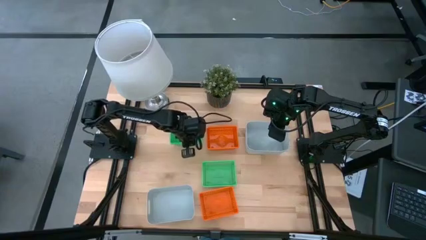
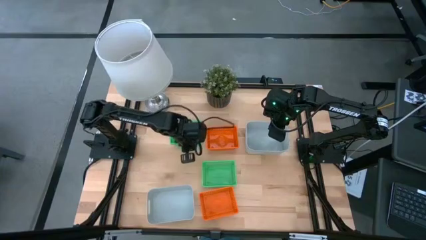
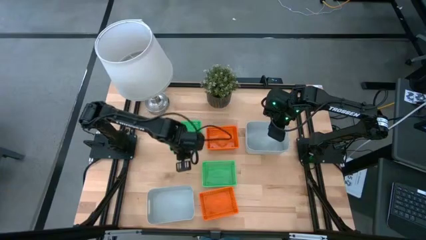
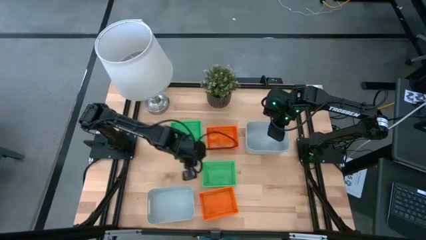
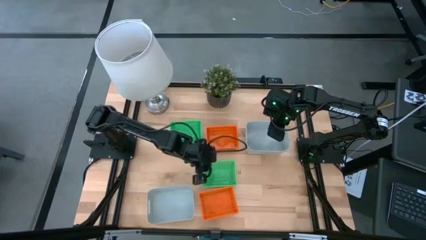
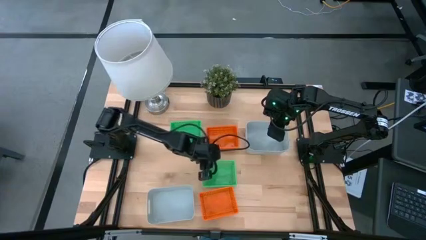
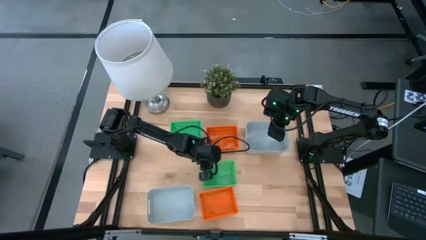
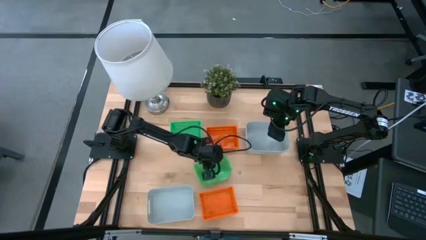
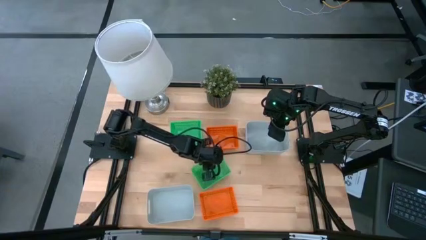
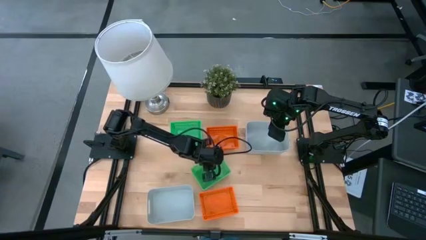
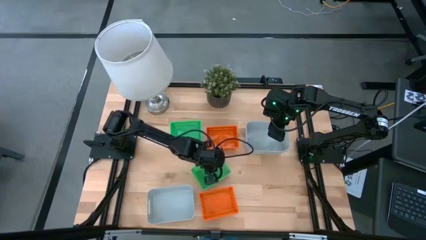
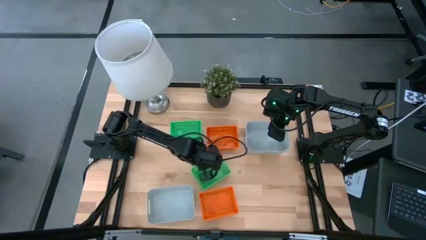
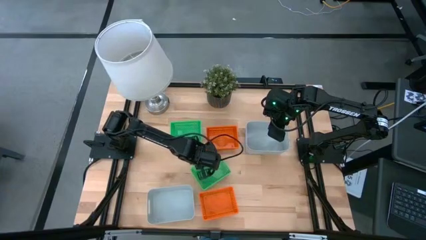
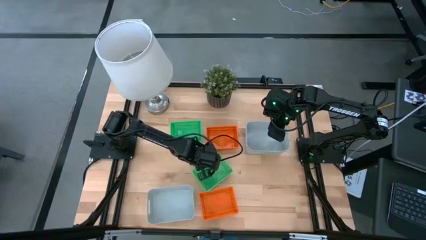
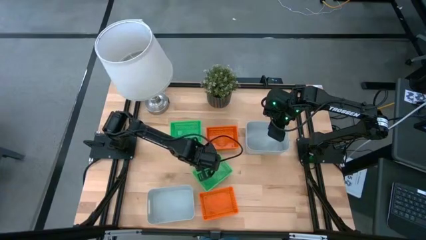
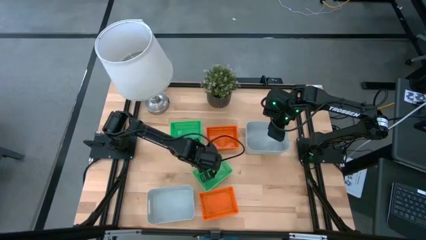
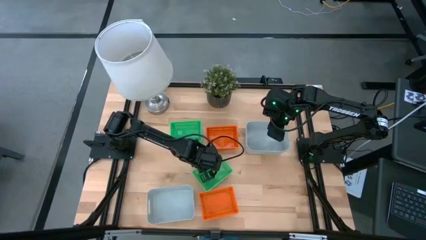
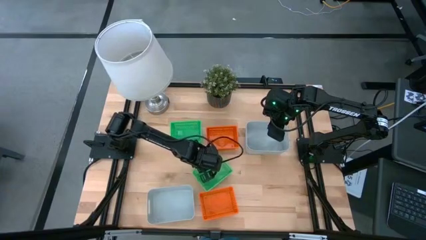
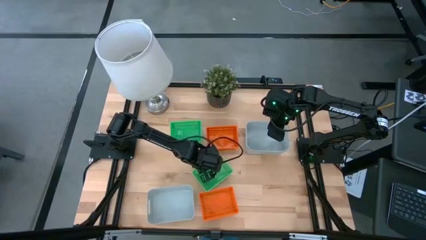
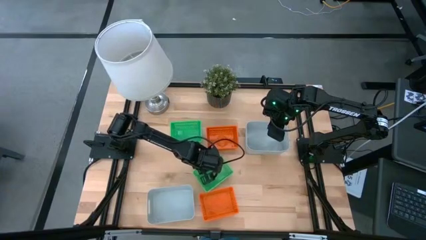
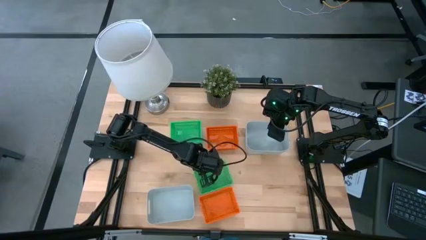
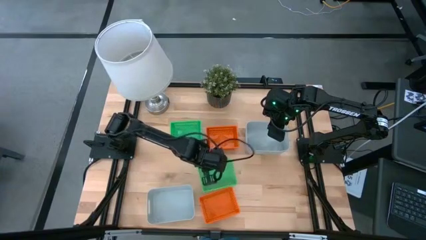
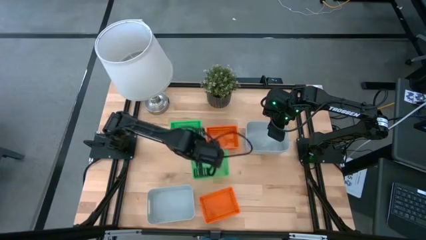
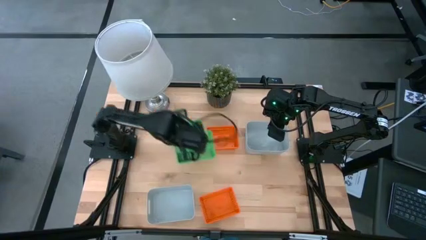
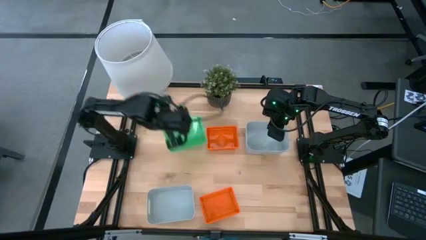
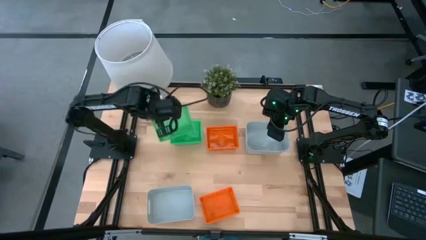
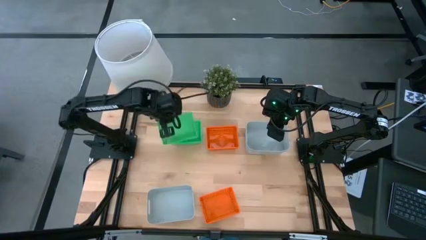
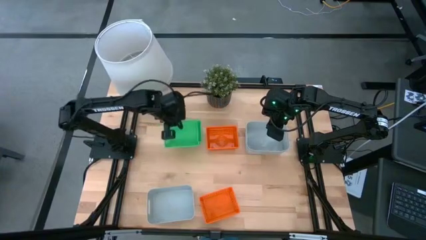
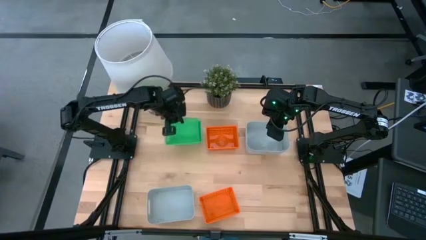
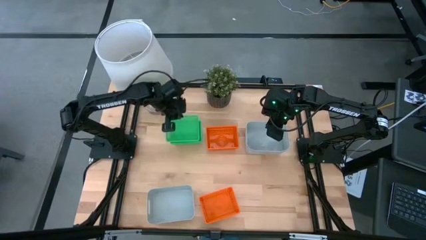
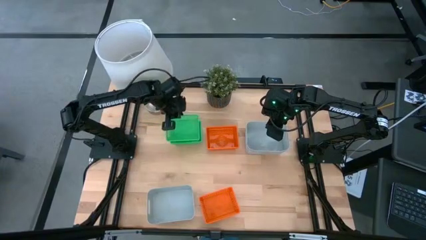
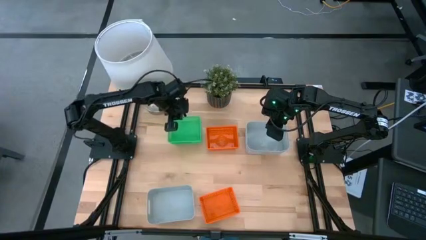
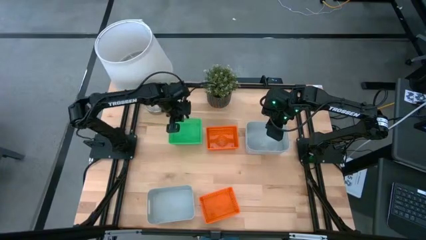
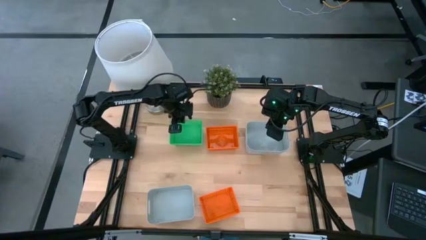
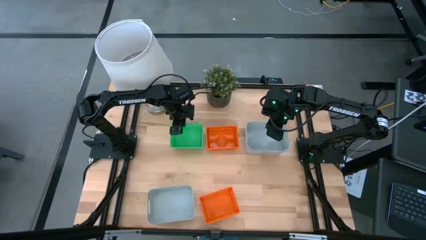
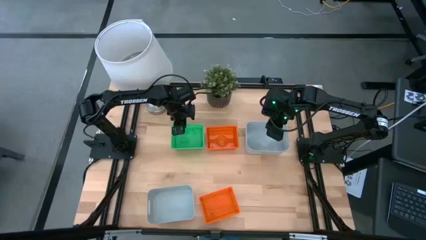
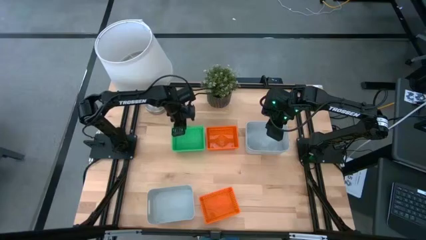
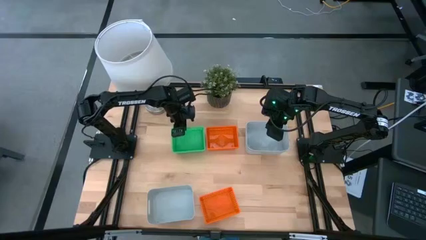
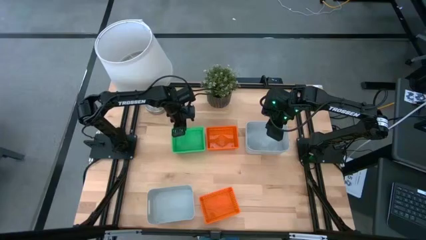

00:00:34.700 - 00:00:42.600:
Stack the bottom green bin on the top of the green bins

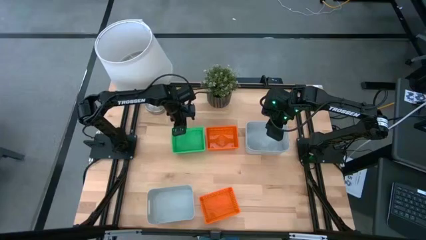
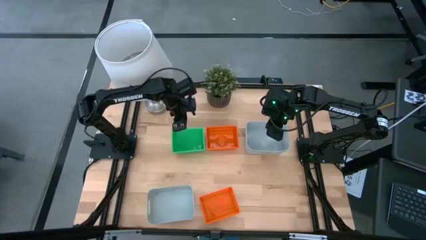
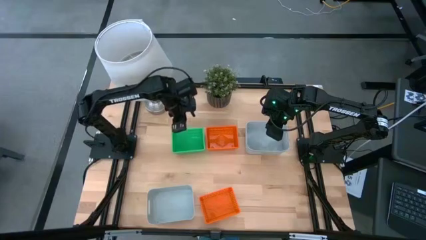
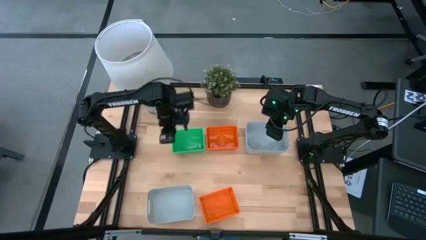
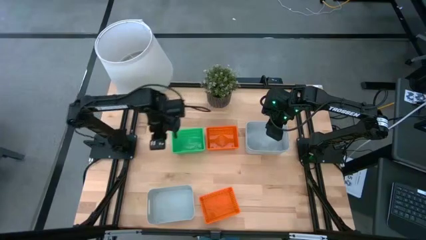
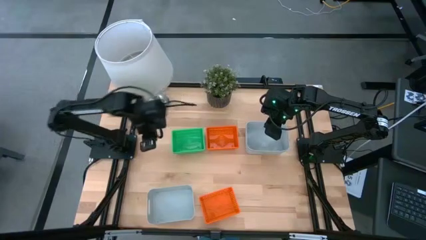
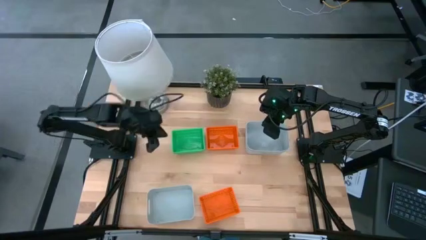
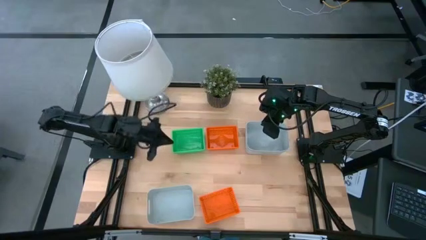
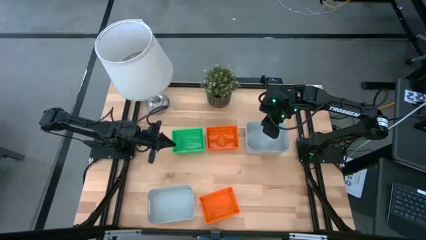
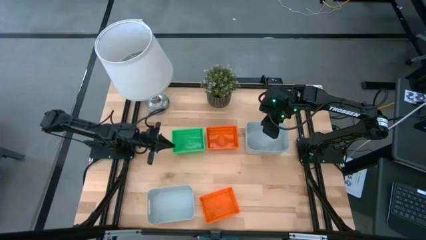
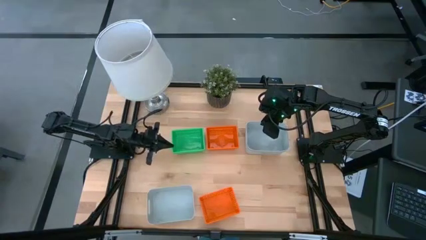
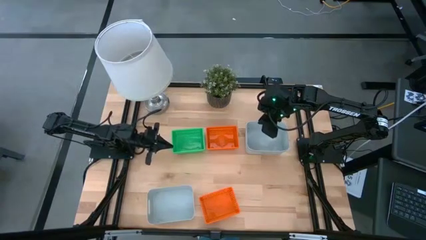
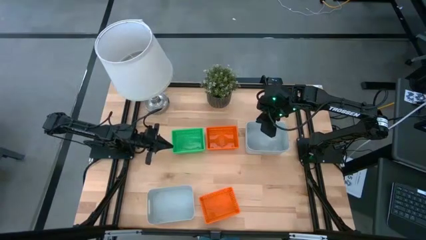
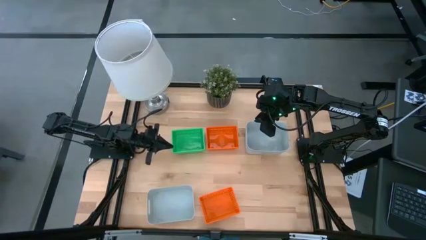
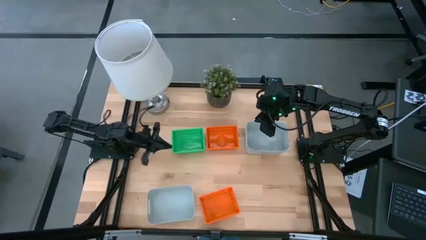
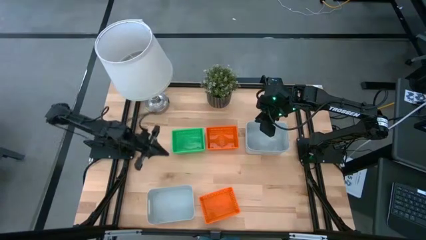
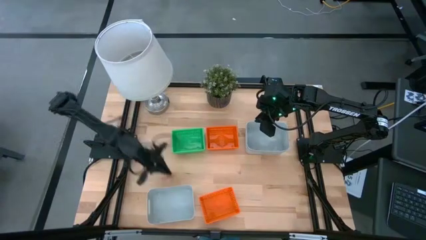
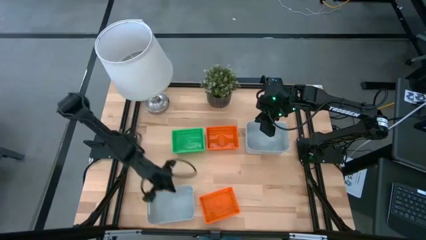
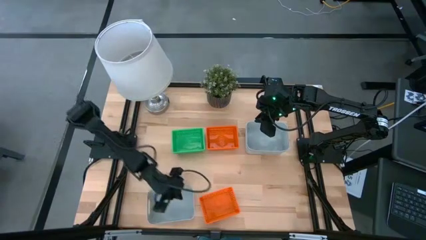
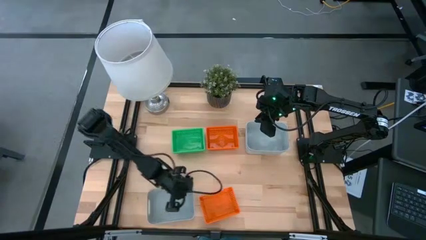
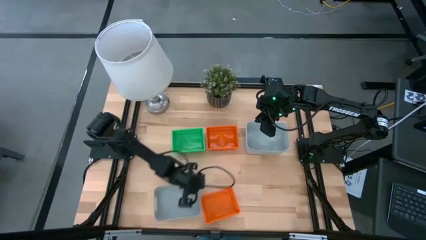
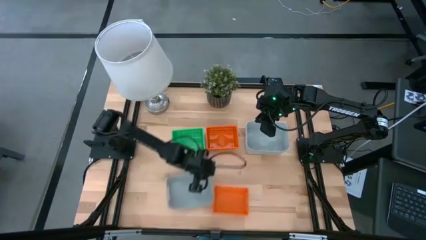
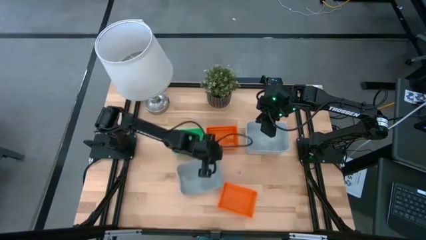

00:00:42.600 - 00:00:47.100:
Adjust the bottom gray bin
